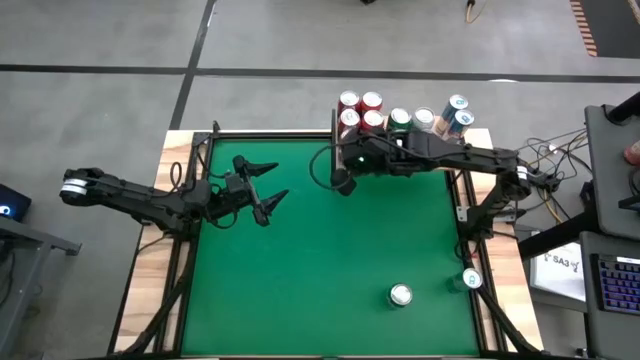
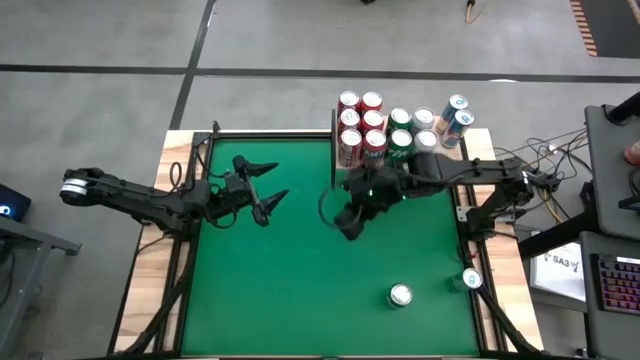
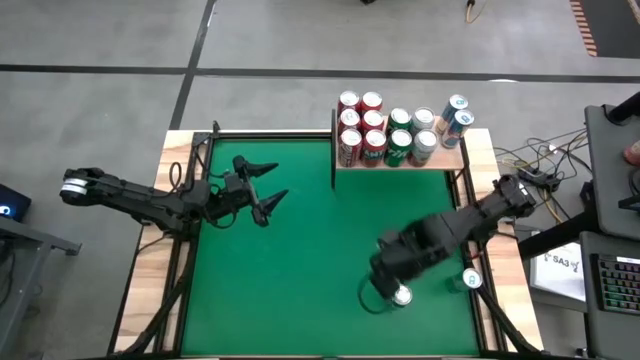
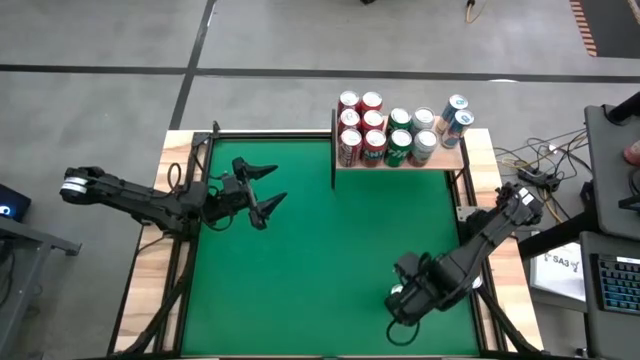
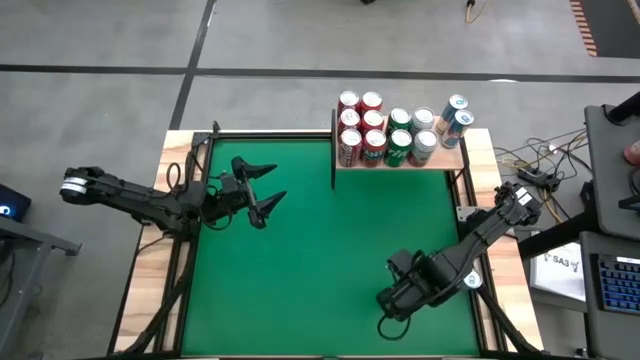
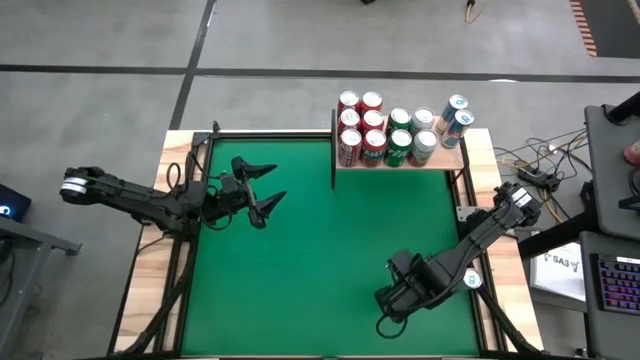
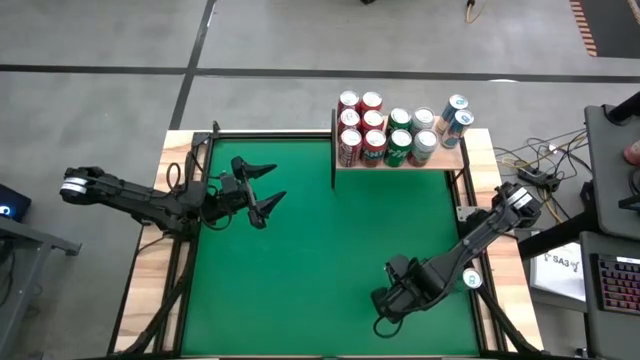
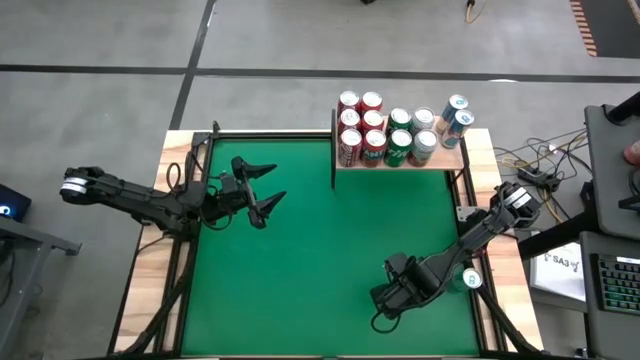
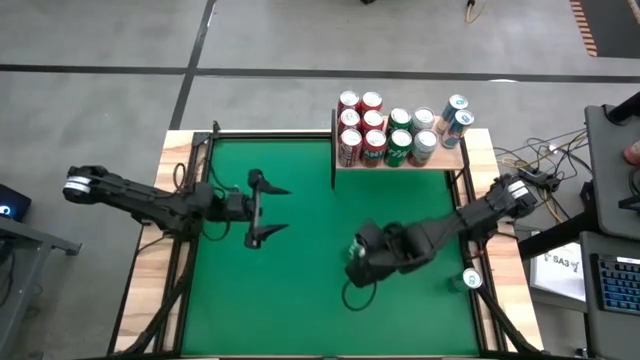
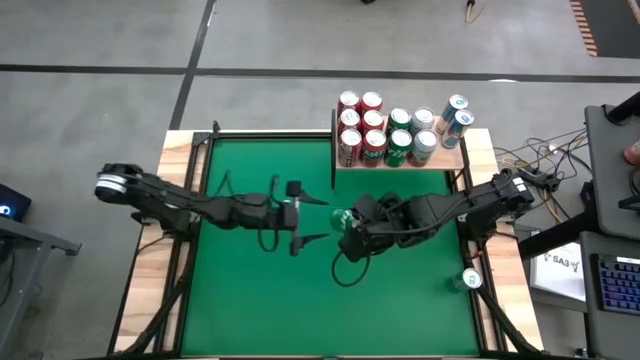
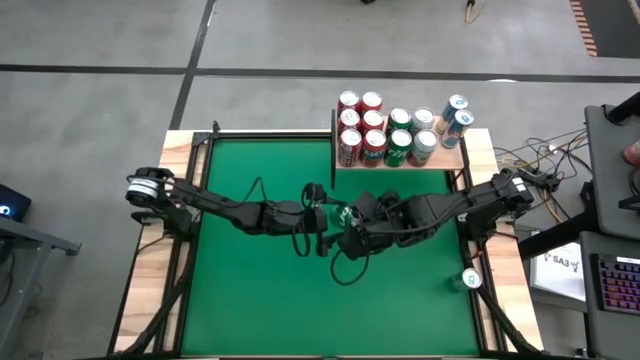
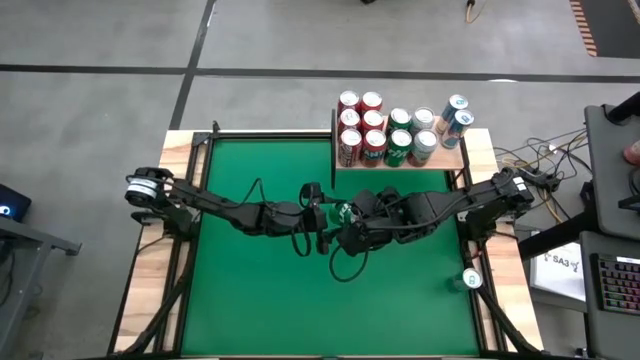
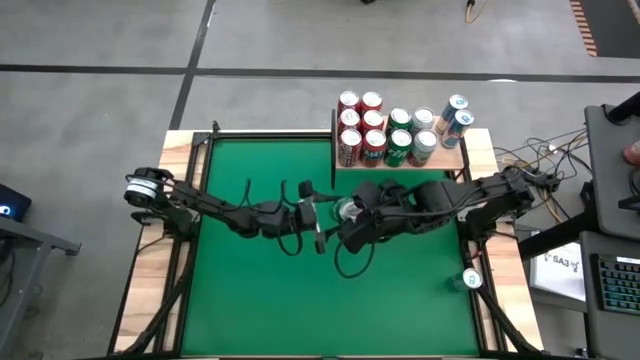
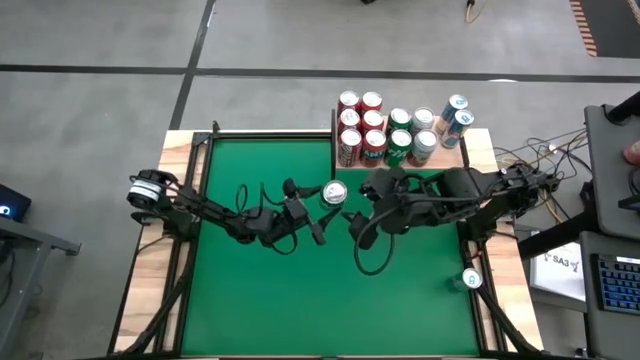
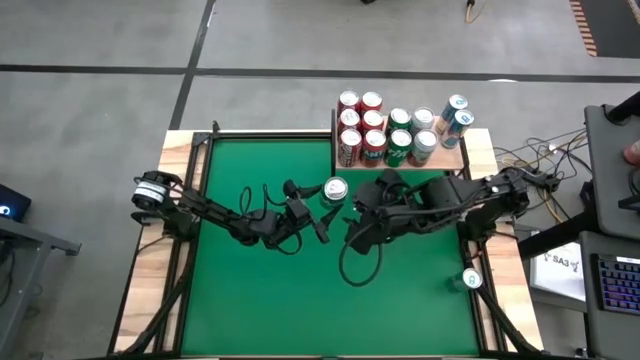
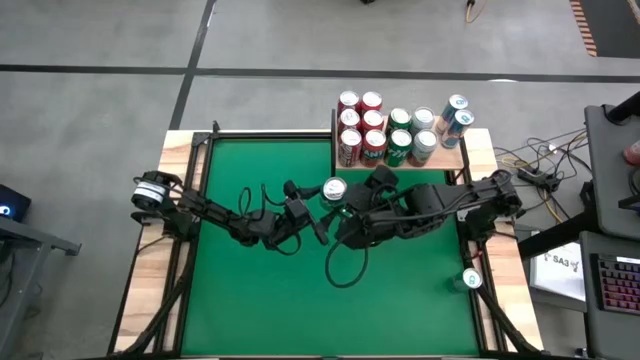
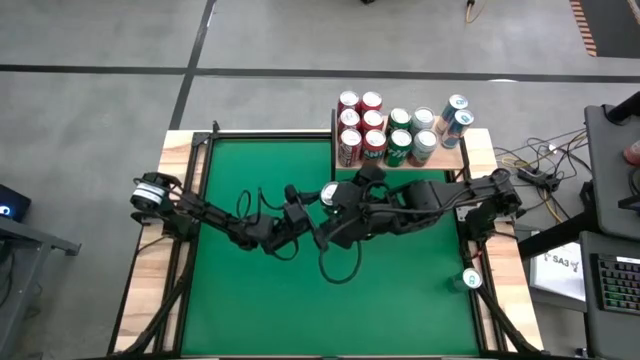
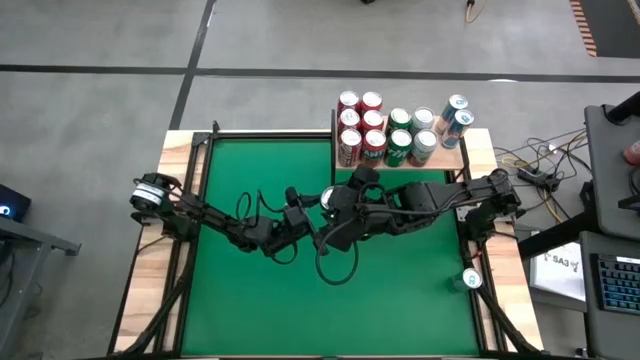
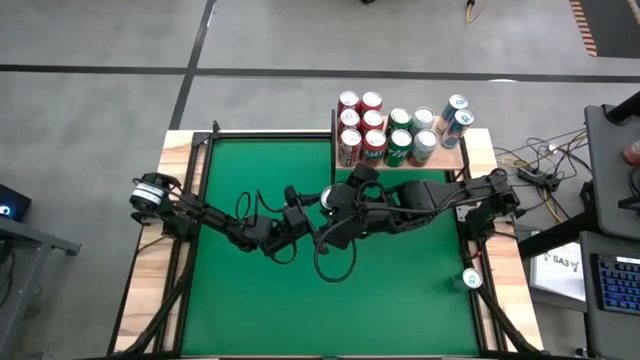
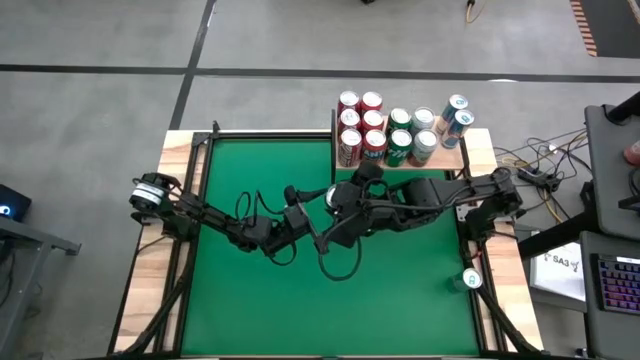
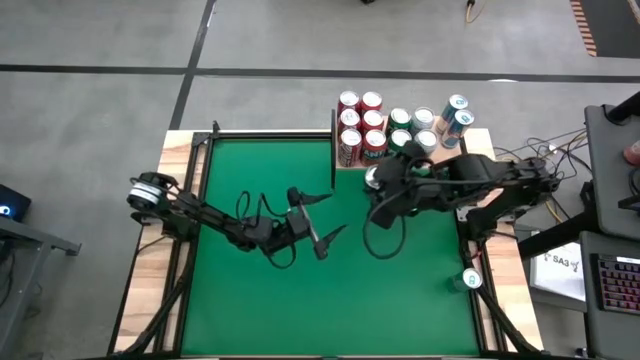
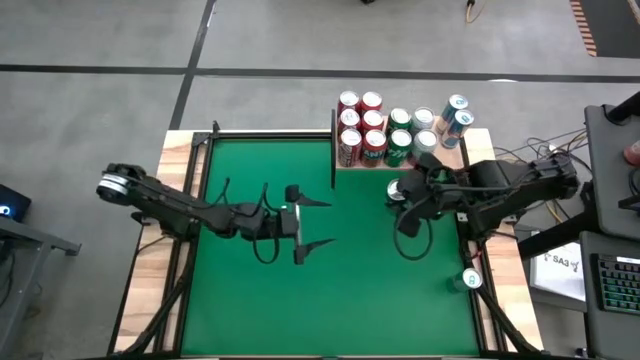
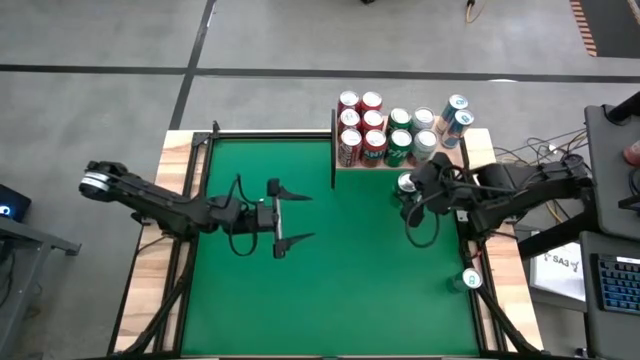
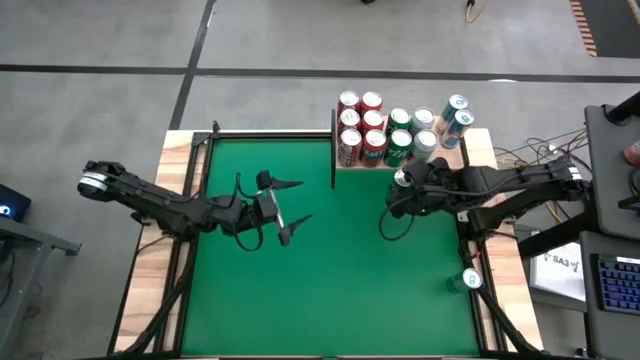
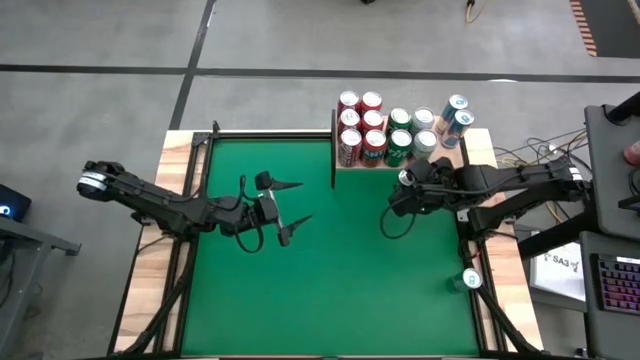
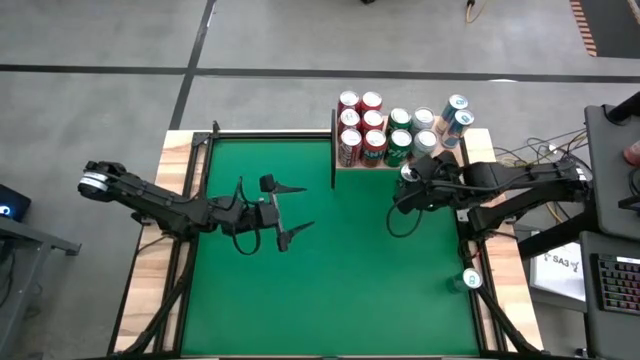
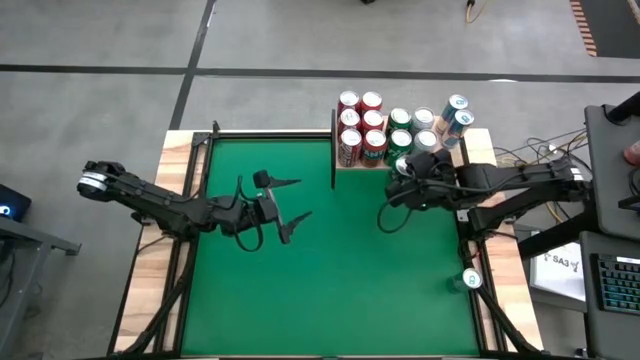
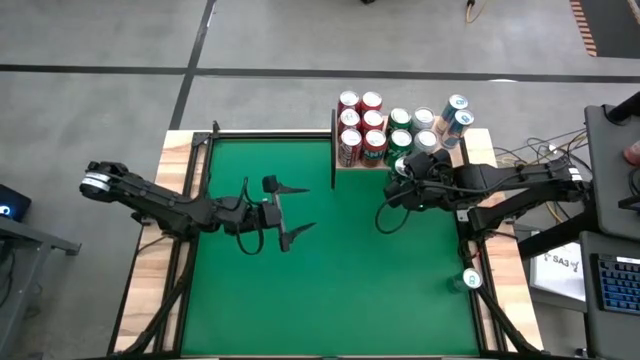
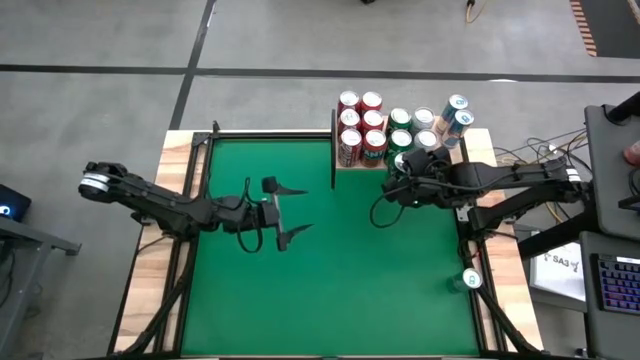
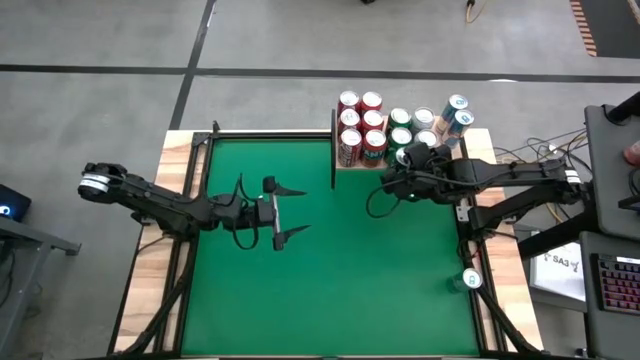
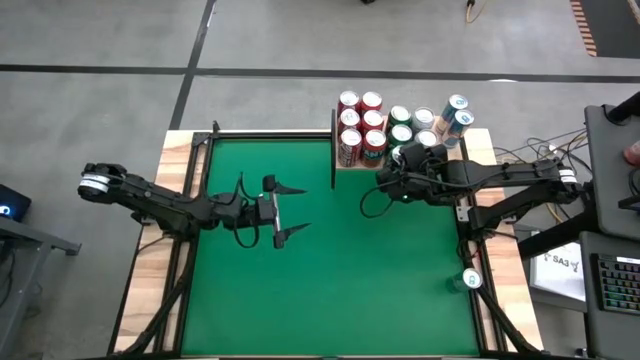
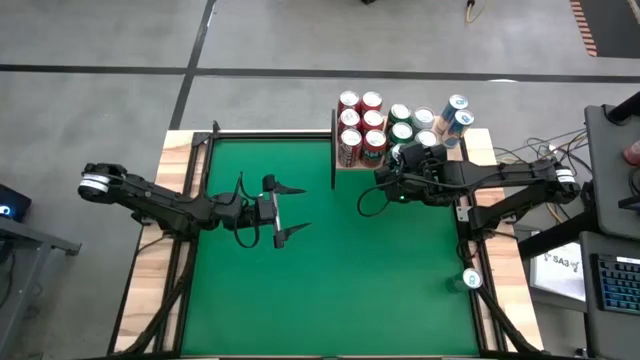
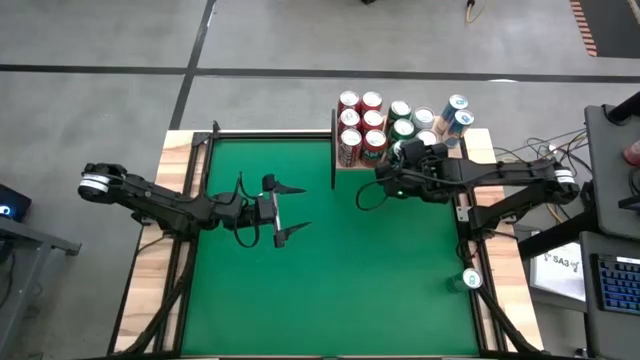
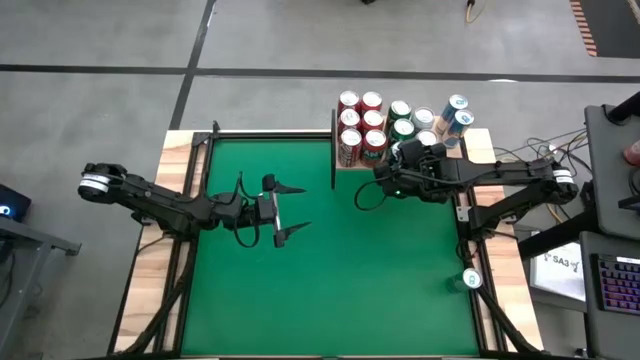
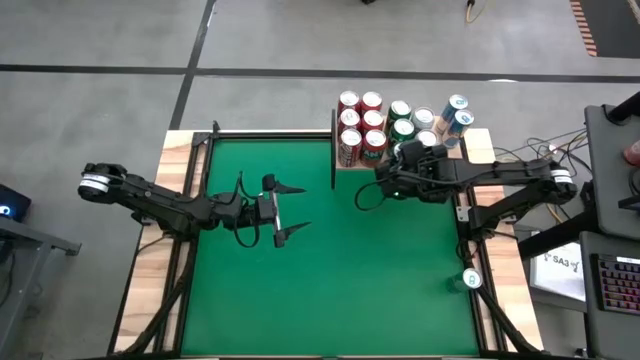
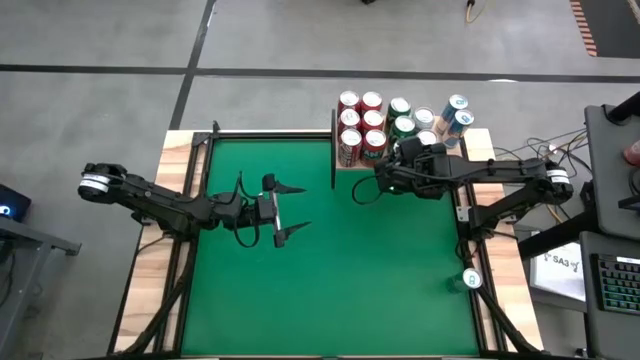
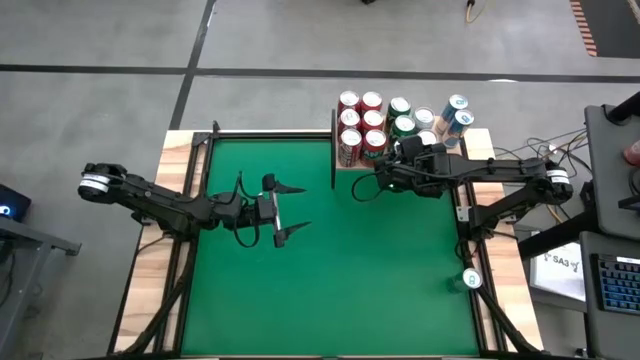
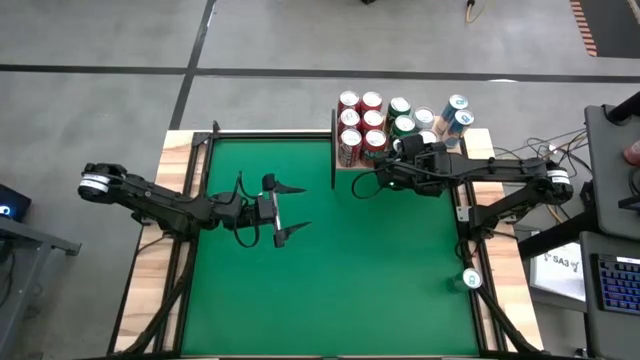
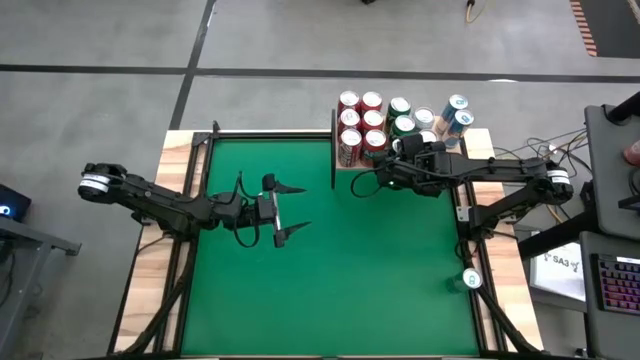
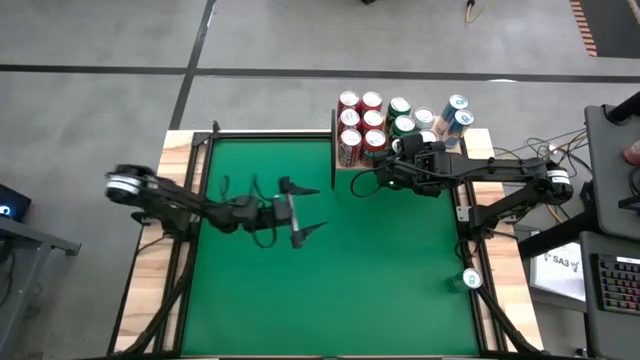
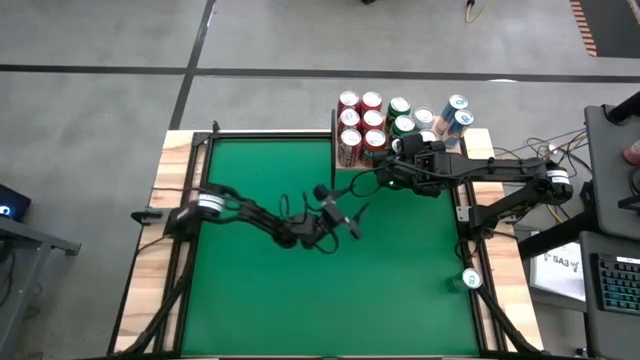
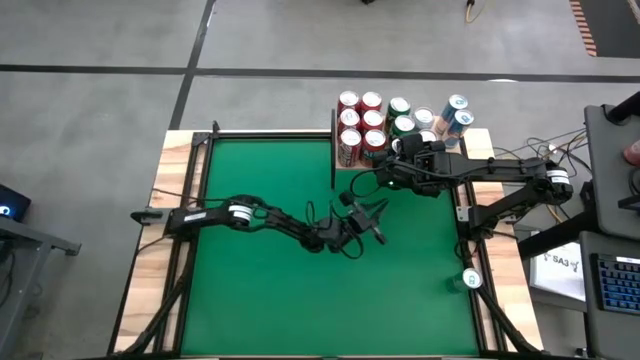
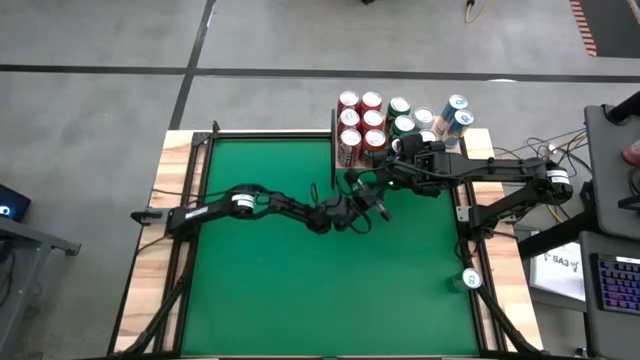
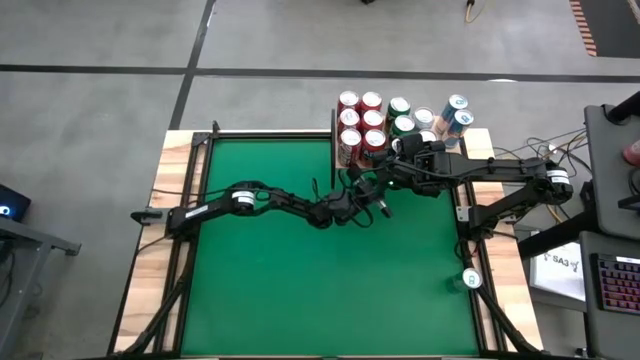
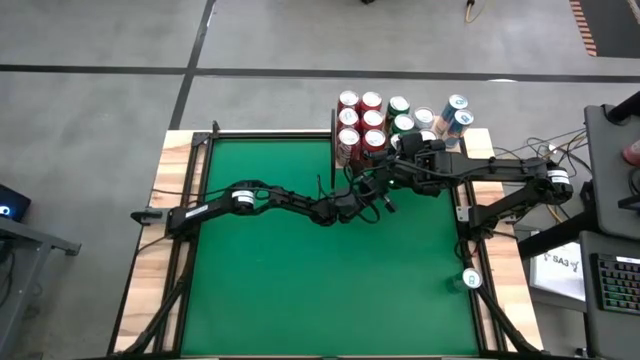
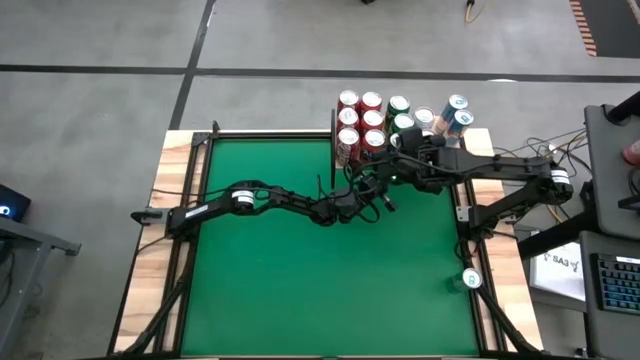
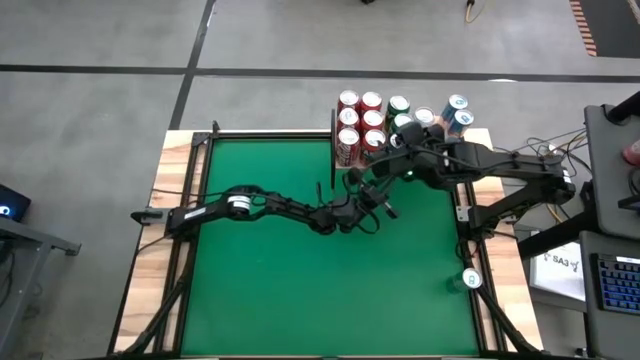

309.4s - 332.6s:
Task: Place canned beverage on shelf
Put the green soda can on the shelf aligned with the other green soda cans
